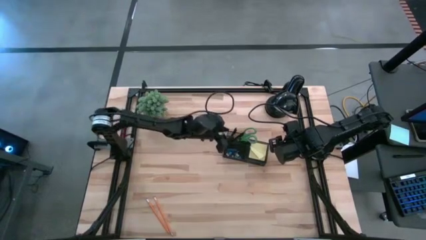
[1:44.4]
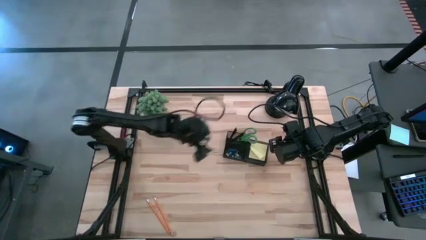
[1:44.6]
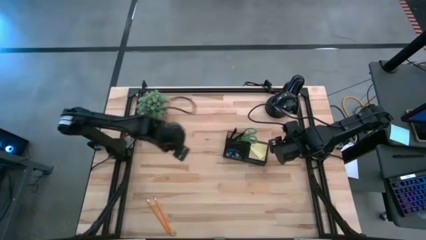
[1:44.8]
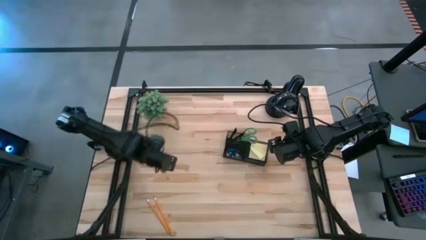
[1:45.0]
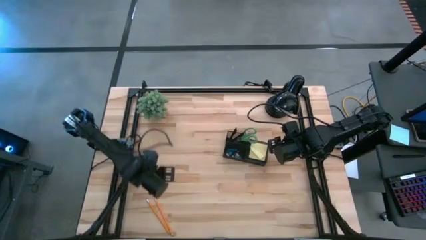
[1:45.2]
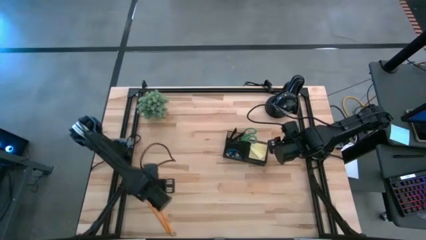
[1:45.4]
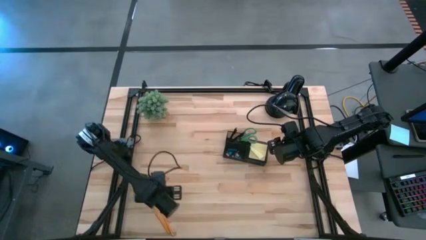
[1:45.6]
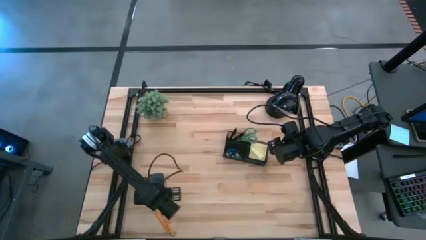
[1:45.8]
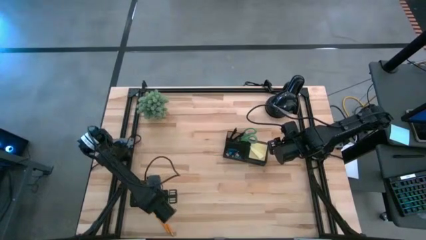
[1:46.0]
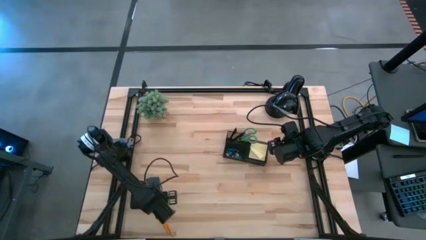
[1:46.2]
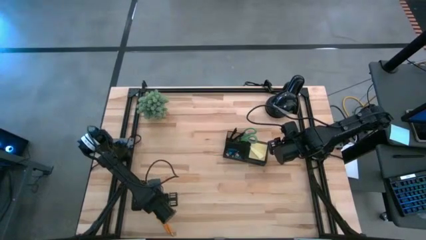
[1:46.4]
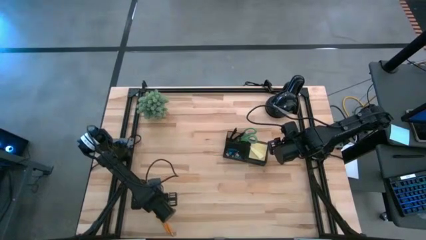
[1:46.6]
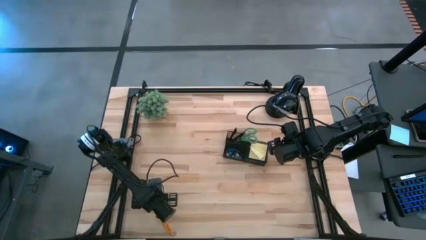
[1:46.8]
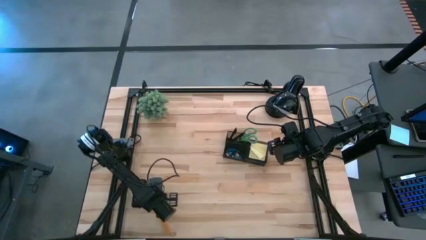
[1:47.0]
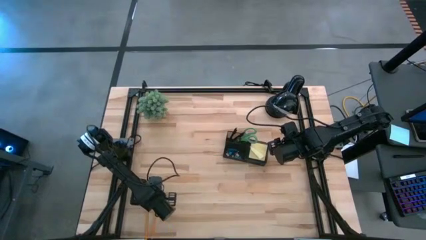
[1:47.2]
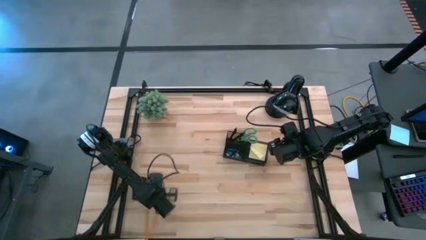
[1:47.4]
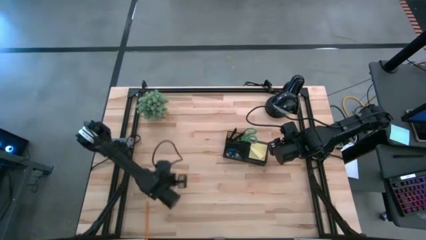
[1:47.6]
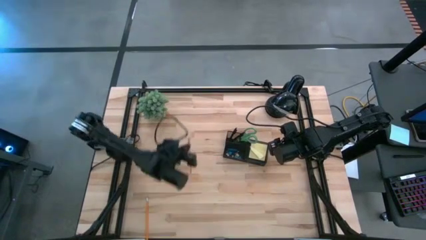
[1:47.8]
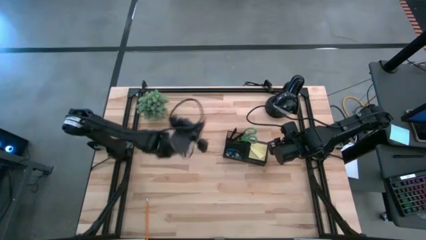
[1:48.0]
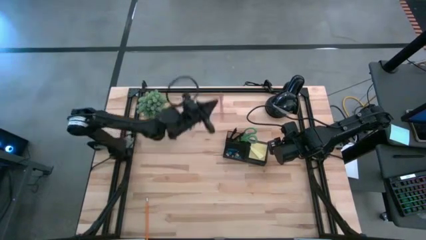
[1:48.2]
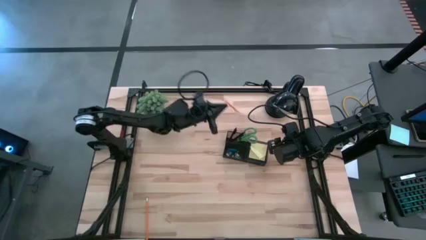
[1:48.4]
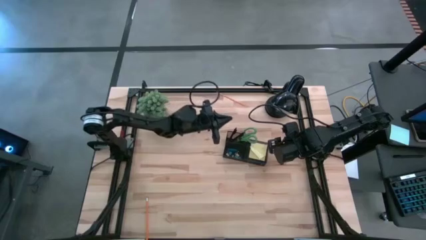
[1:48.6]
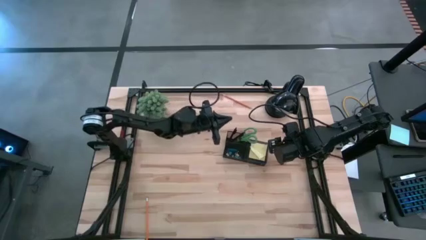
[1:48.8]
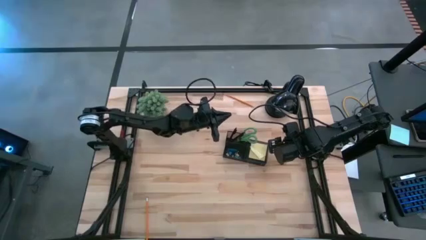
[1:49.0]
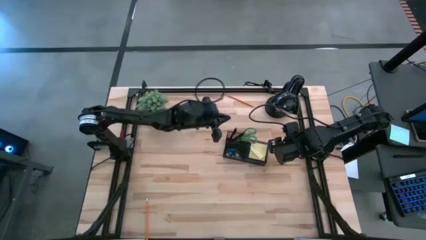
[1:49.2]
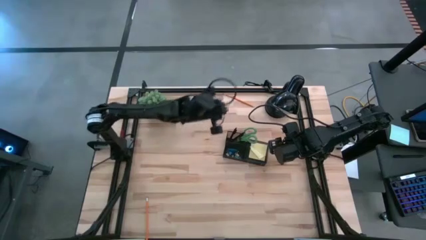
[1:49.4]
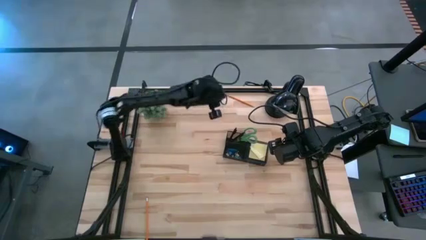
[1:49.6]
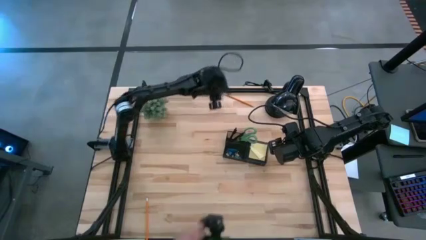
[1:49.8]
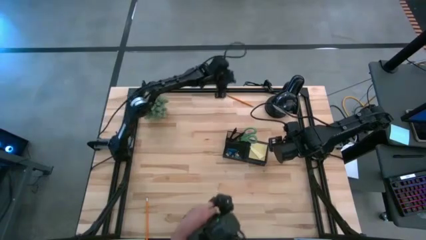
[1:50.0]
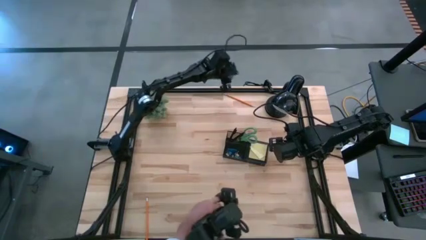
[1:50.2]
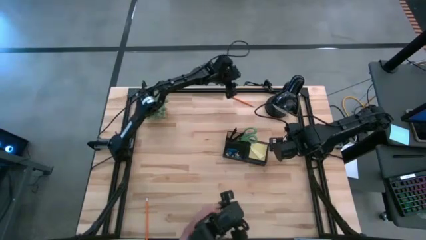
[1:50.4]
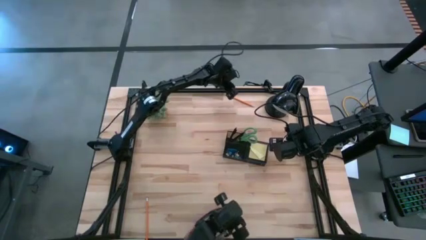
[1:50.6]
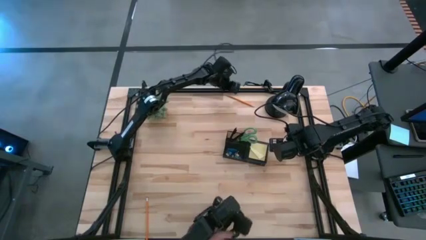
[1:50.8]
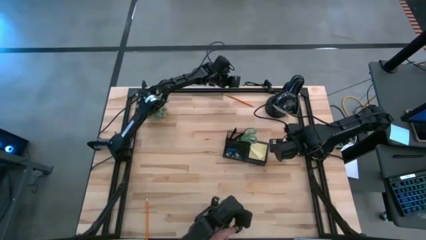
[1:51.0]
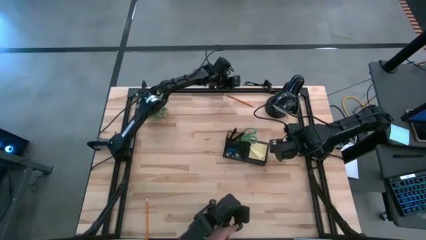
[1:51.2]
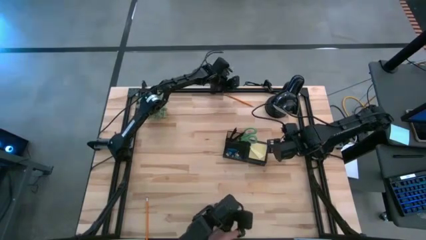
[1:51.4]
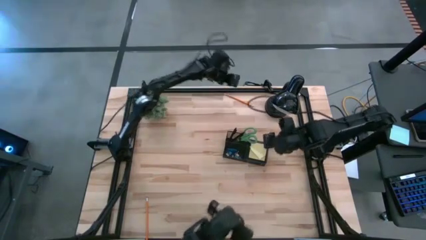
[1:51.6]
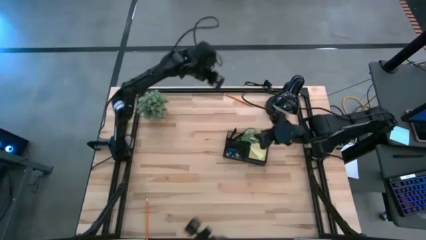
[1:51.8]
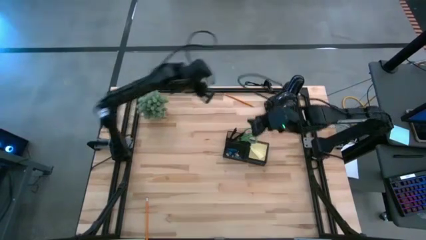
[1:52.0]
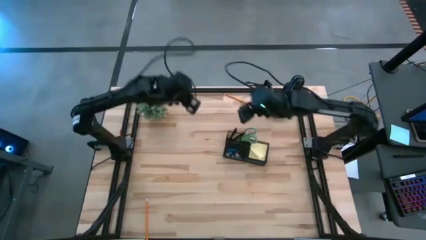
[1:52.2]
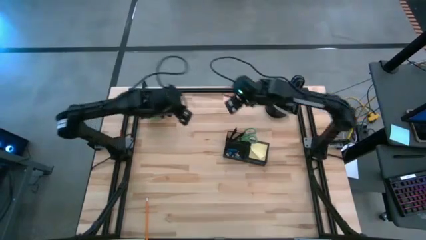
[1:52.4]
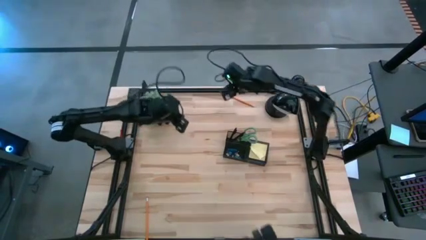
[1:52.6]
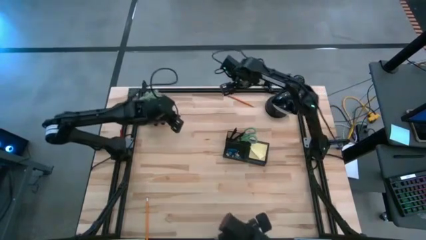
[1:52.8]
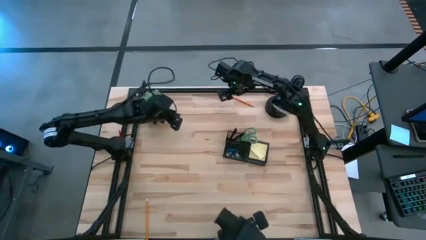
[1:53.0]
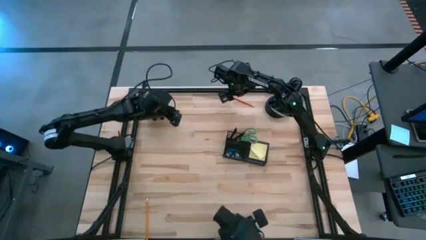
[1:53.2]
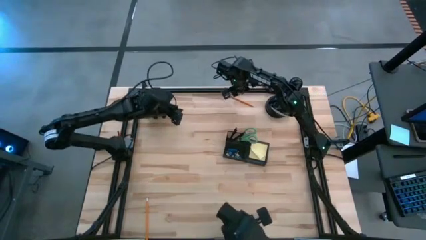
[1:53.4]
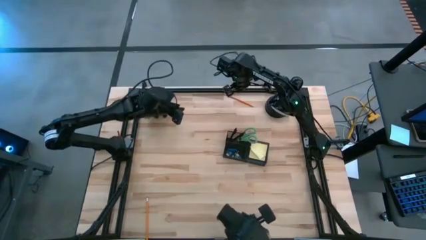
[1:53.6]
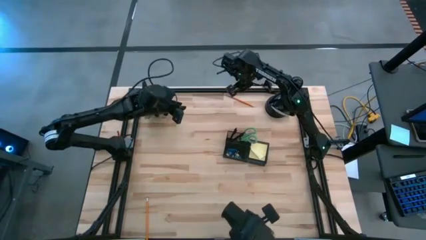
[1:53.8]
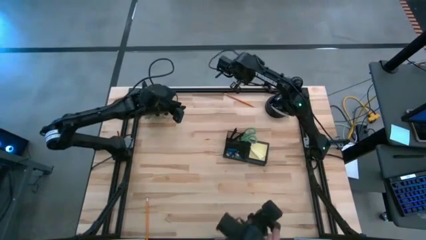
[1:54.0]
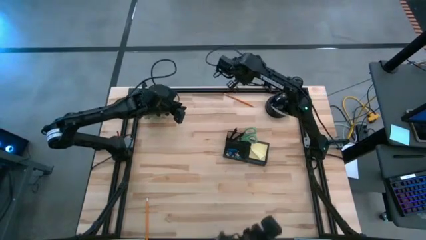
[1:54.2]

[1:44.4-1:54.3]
Task: Pick and place office supplies into organizer
Put the right orange pencil into the black mesh organizer

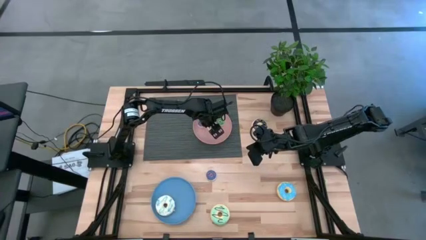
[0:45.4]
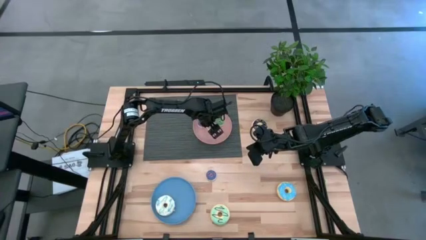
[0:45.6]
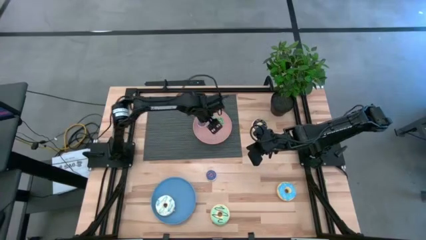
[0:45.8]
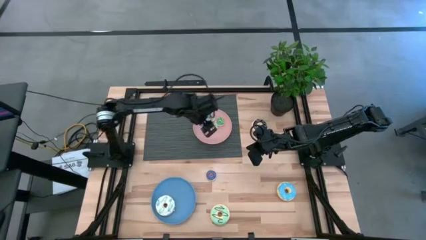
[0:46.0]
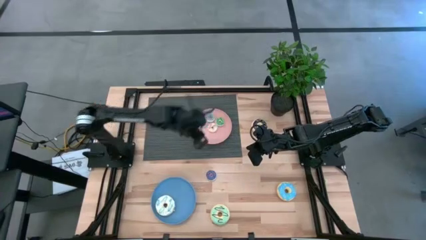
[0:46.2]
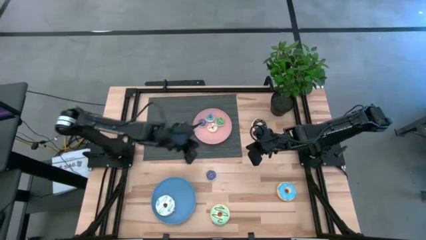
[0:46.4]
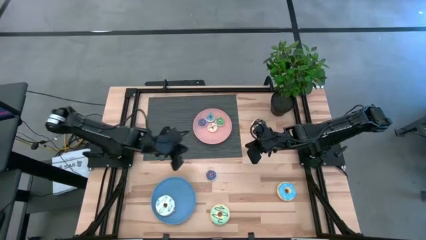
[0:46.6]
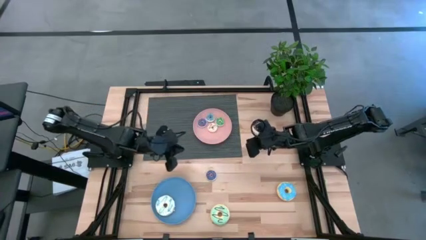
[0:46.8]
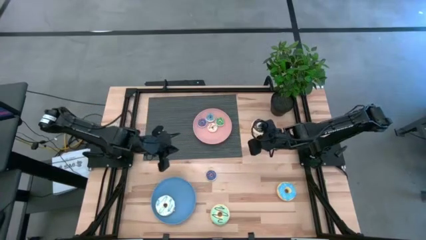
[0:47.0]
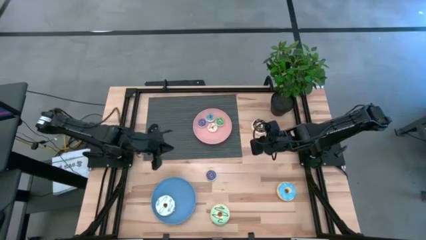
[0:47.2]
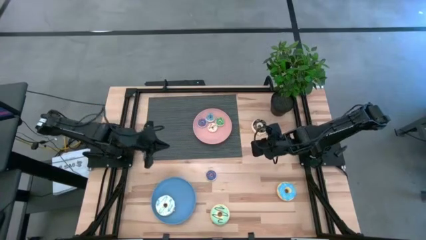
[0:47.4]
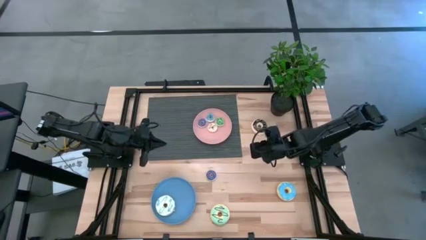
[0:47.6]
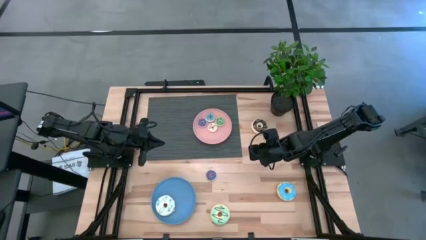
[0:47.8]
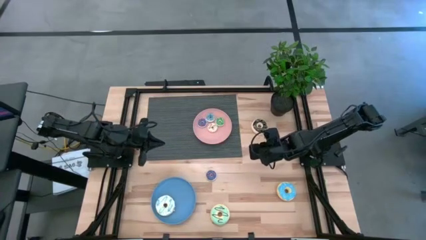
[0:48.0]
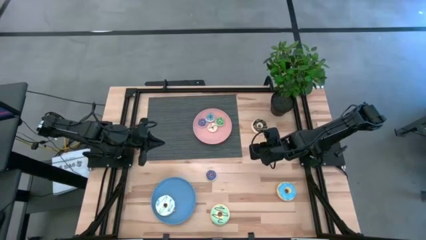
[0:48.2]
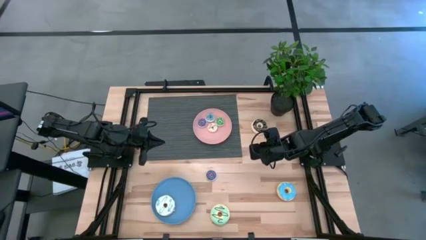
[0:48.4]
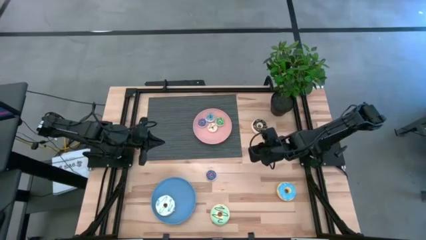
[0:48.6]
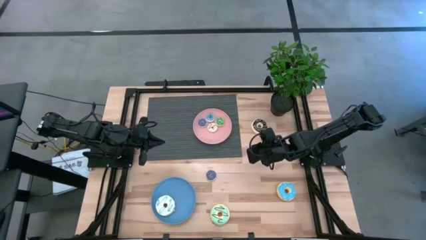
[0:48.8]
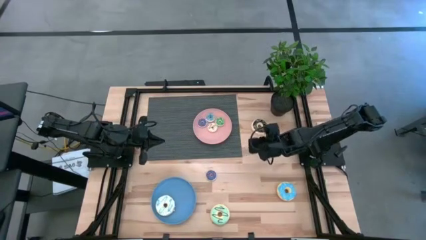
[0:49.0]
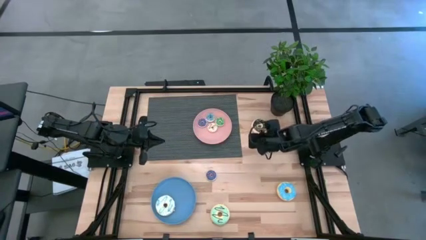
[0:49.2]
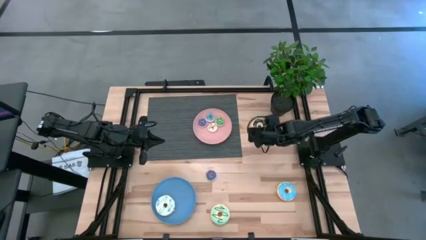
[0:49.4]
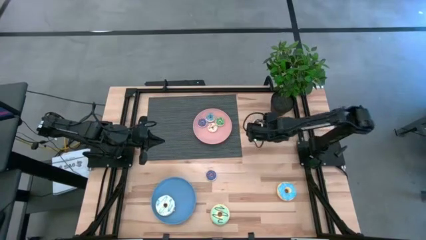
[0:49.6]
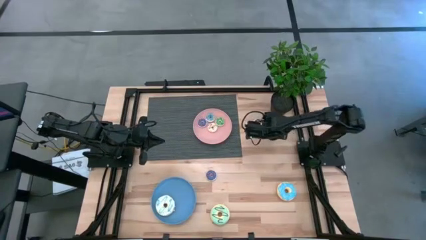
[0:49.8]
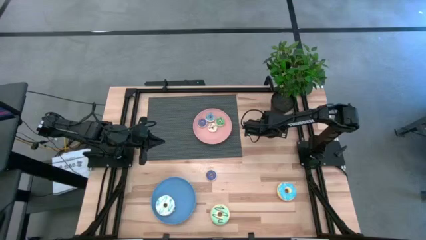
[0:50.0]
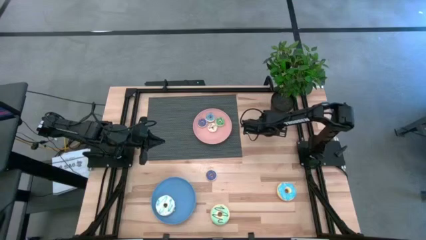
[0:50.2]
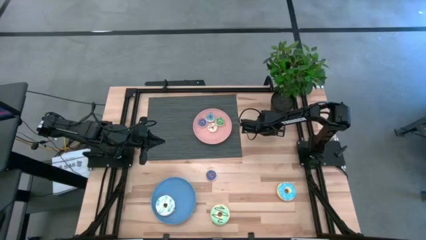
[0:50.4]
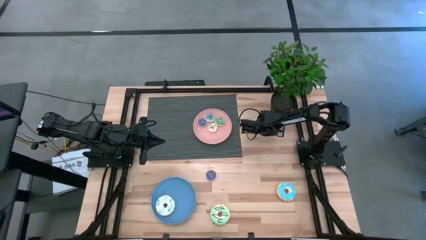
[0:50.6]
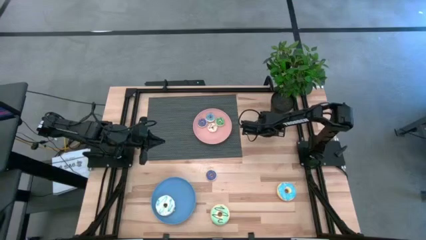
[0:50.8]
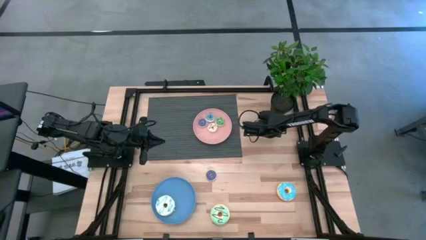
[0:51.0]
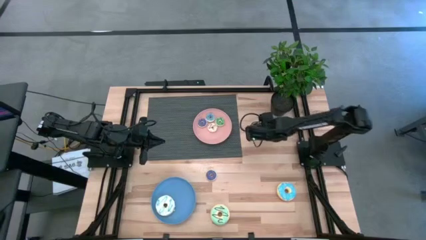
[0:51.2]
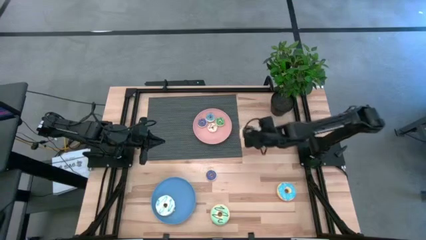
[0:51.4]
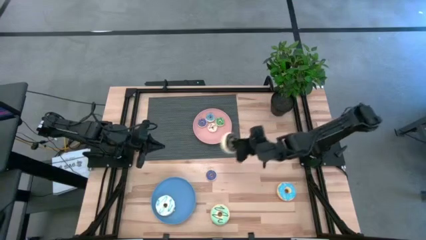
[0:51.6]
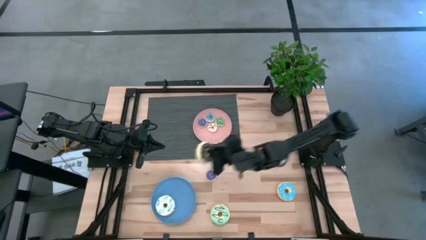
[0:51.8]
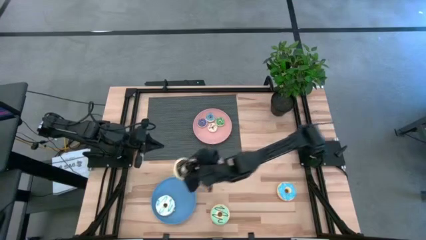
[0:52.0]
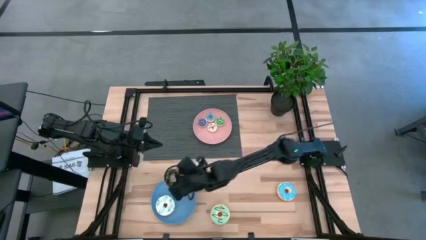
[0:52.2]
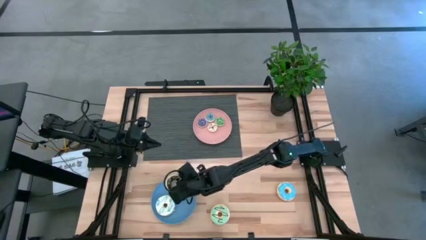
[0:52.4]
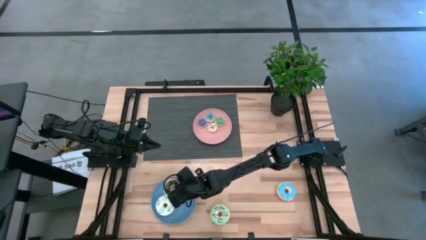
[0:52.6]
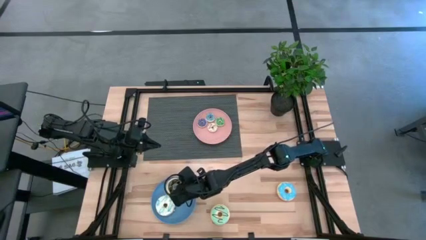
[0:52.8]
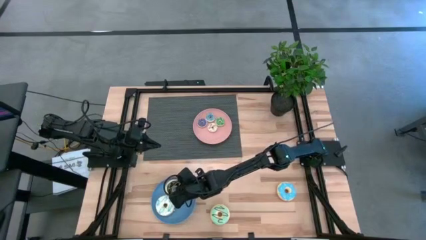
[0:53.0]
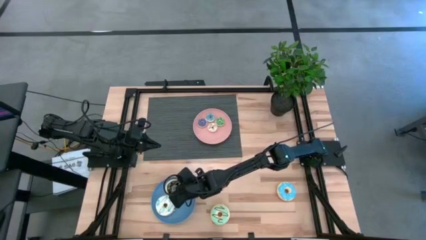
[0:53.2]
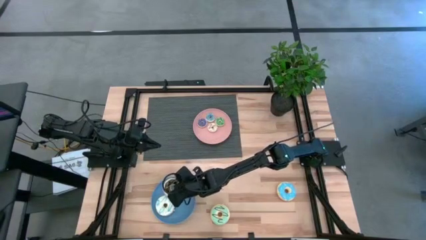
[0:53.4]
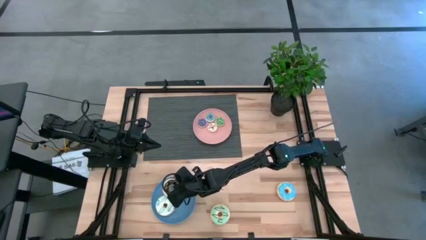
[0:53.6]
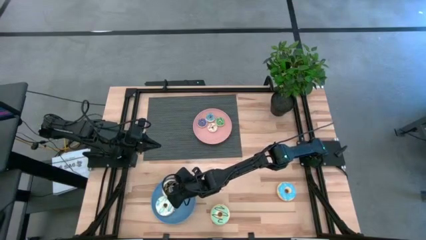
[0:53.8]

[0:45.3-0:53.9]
Task: Pick & Place donuts
Put the big black donut on the blue plate
